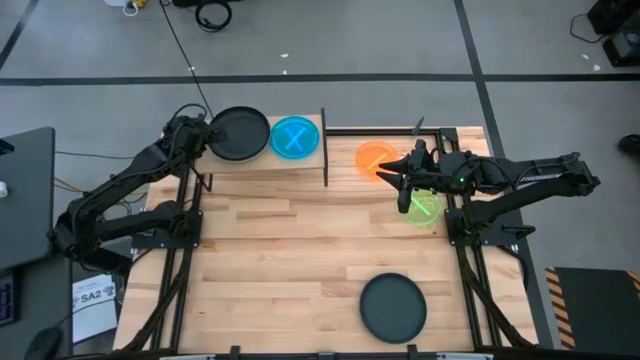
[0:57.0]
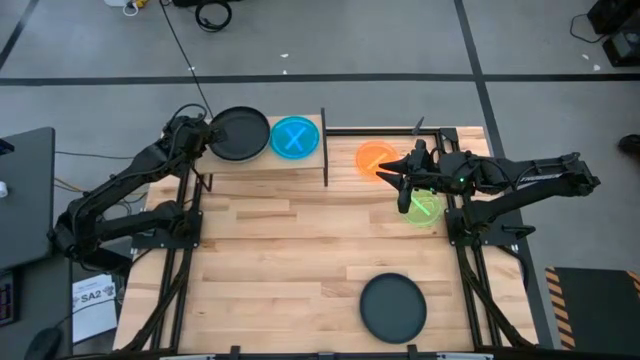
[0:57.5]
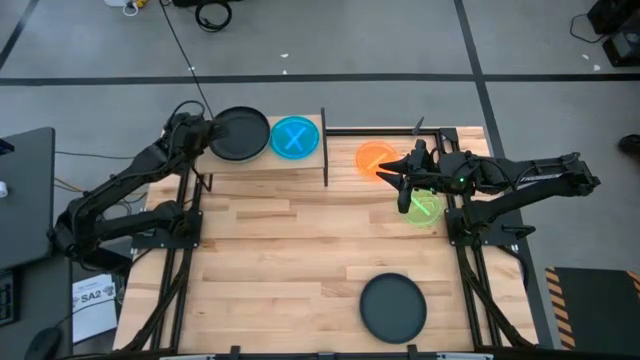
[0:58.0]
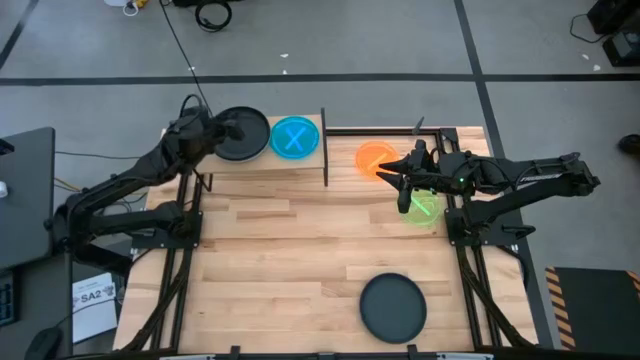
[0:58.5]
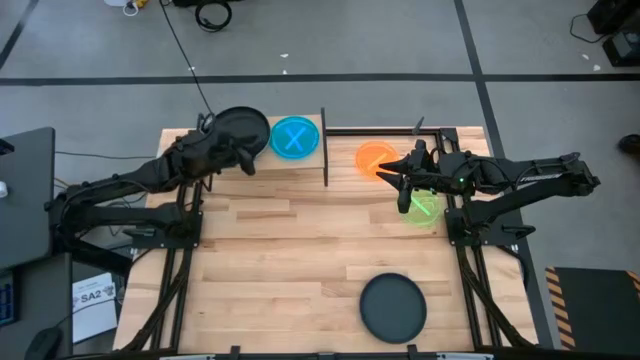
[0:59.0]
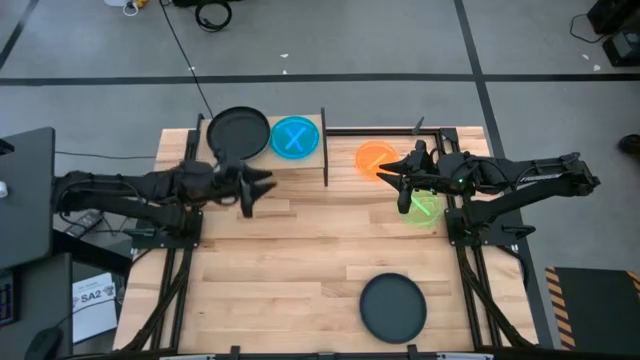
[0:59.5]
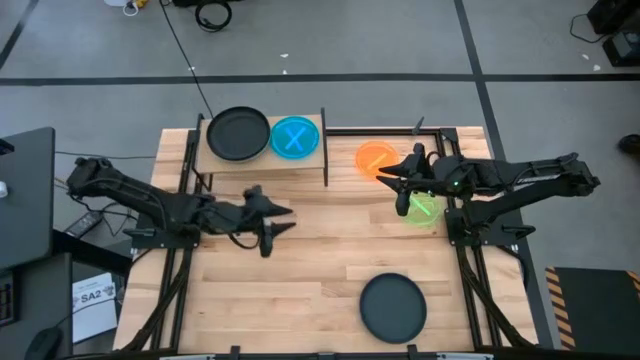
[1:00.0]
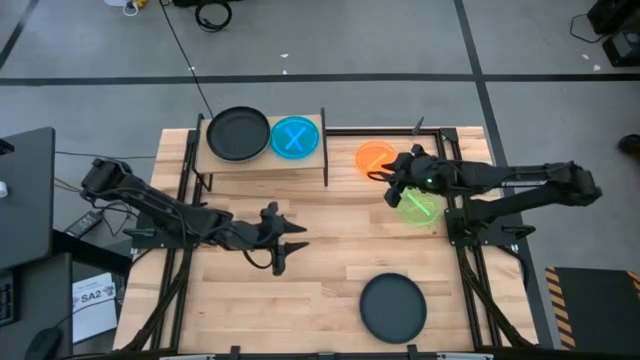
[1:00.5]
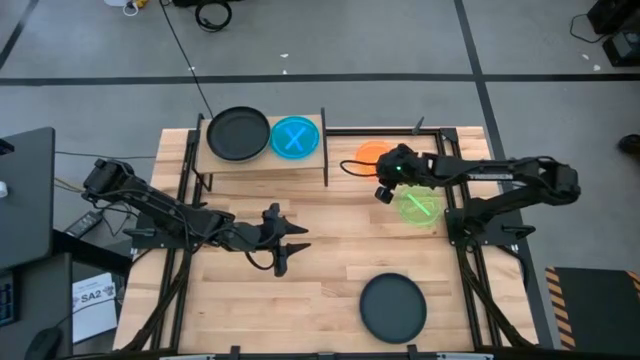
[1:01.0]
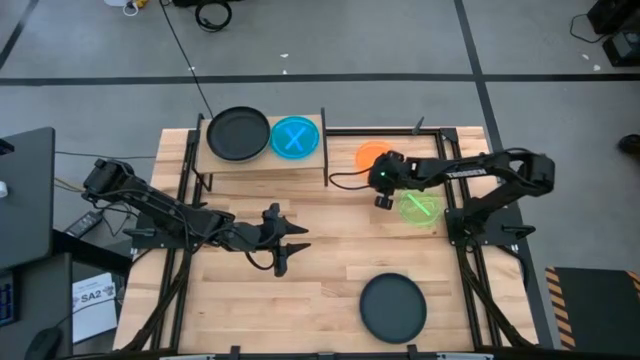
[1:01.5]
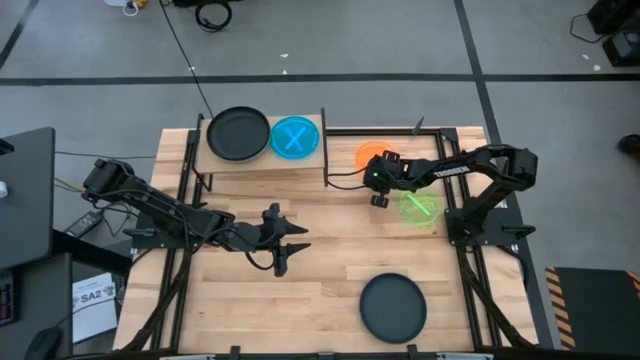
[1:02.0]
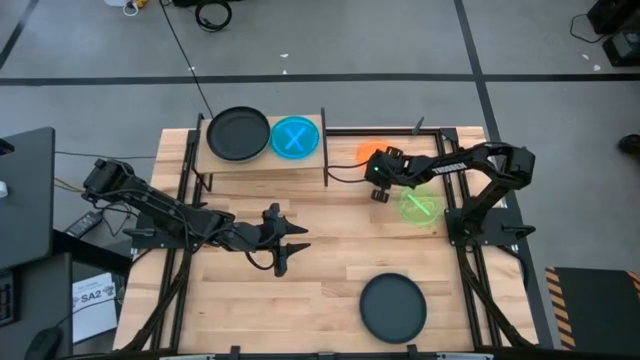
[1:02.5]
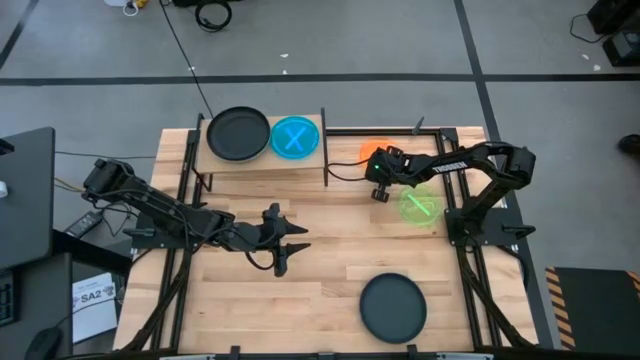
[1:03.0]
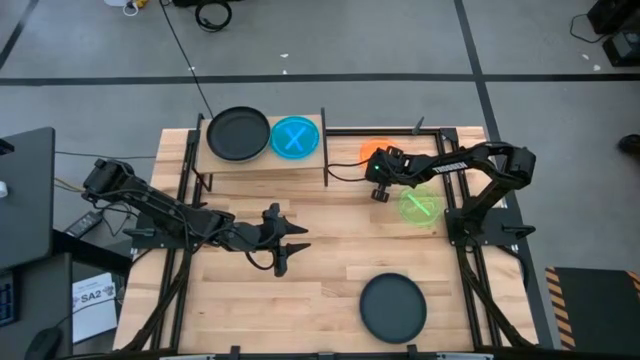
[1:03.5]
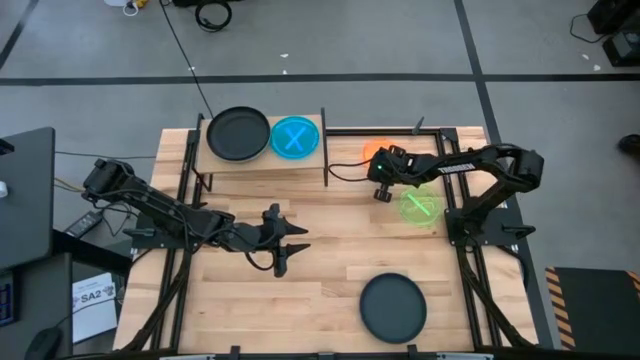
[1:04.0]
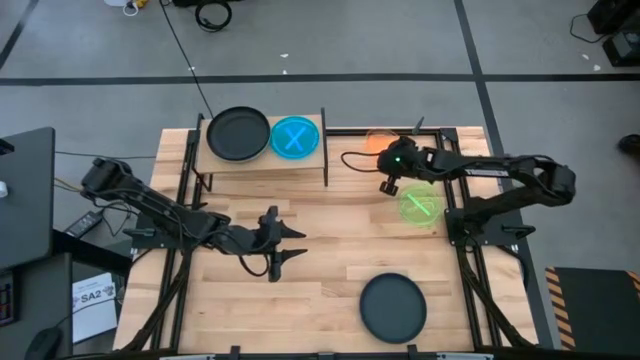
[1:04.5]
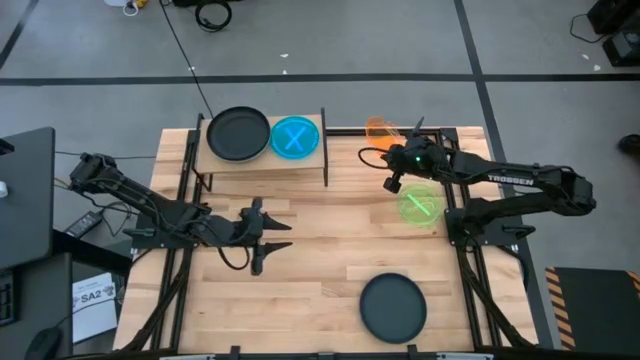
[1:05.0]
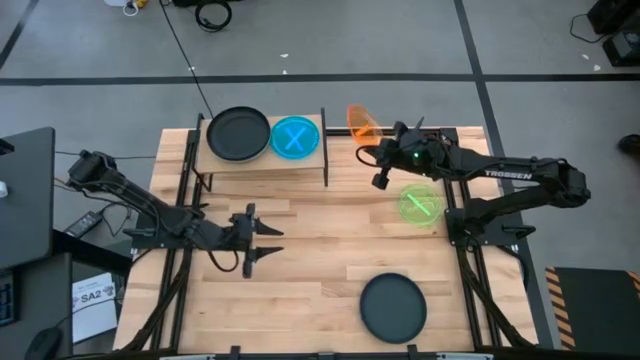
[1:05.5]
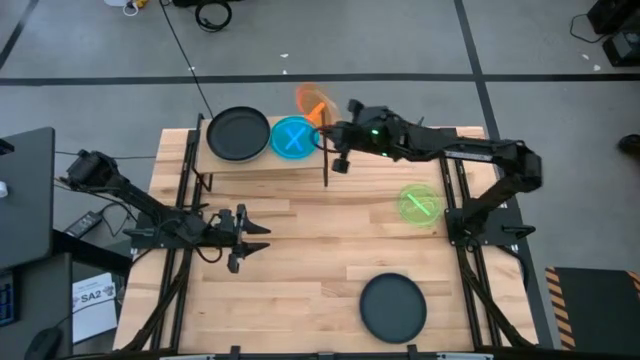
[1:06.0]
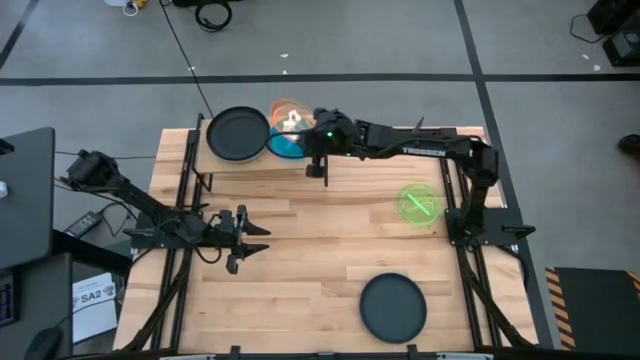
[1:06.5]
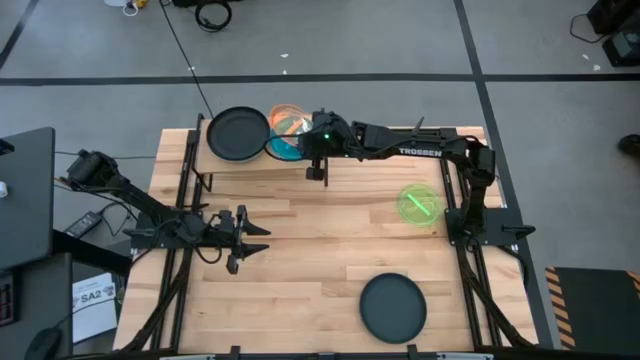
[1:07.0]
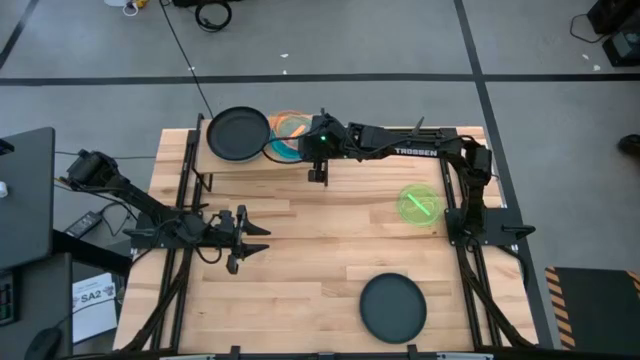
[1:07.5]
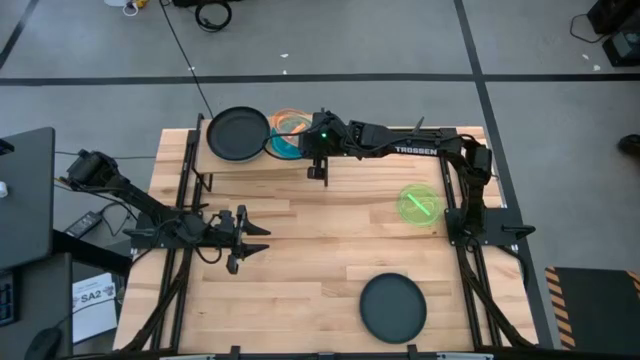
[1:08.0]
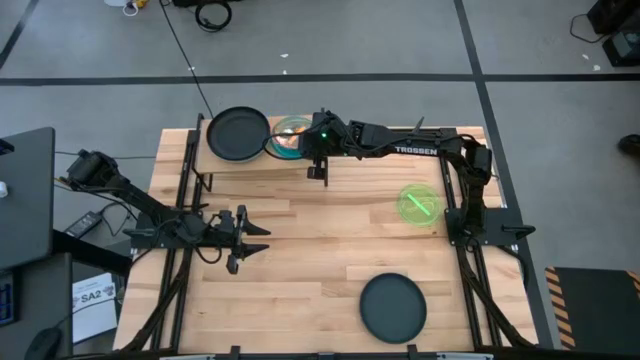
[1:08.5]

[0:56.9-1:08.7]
Task: Place and stack plates onto a shelf
Stack the orange plate on top of the blue plate on the shelf

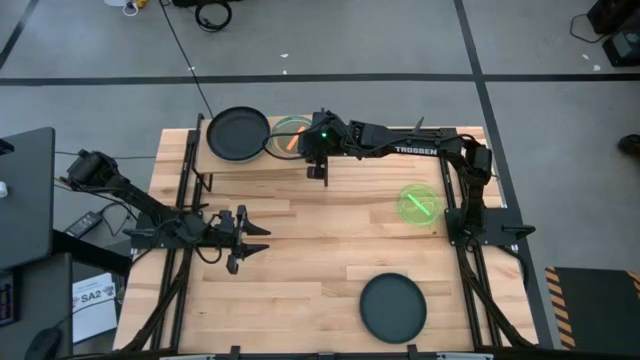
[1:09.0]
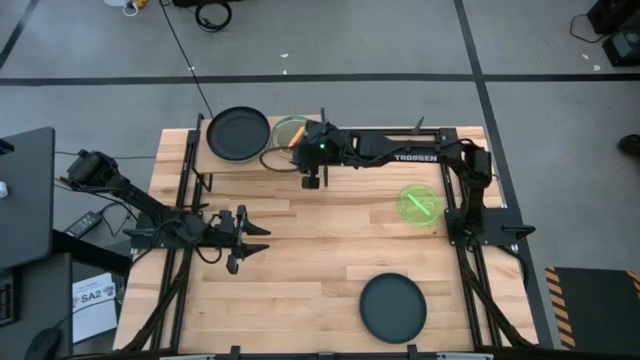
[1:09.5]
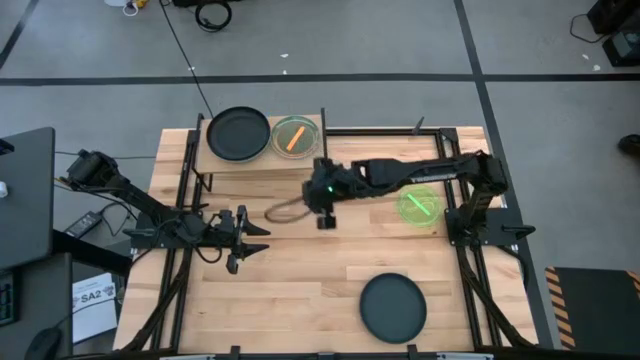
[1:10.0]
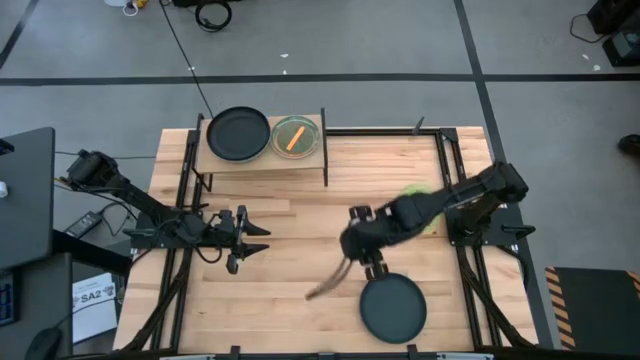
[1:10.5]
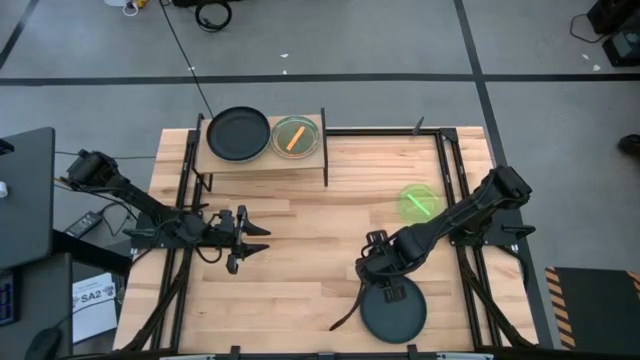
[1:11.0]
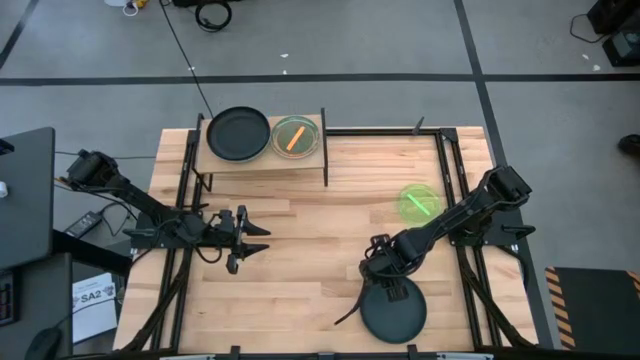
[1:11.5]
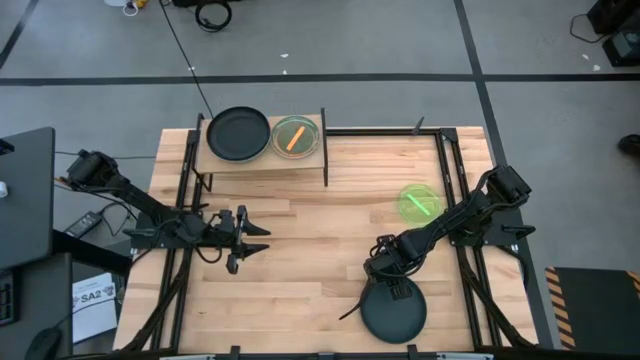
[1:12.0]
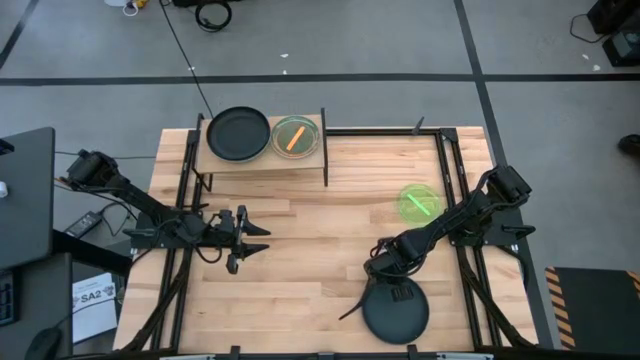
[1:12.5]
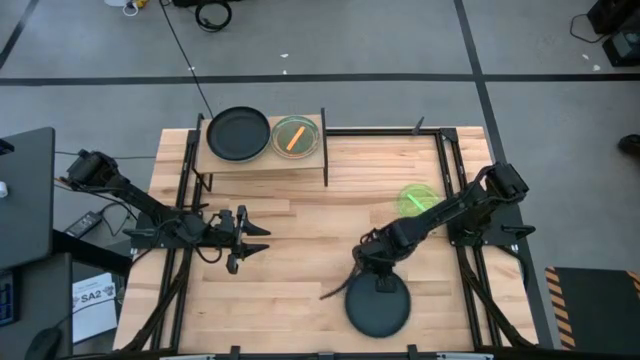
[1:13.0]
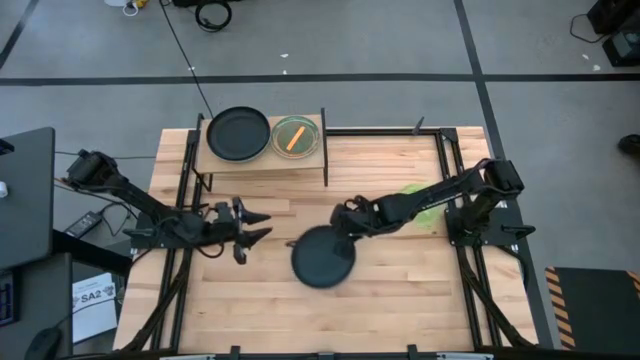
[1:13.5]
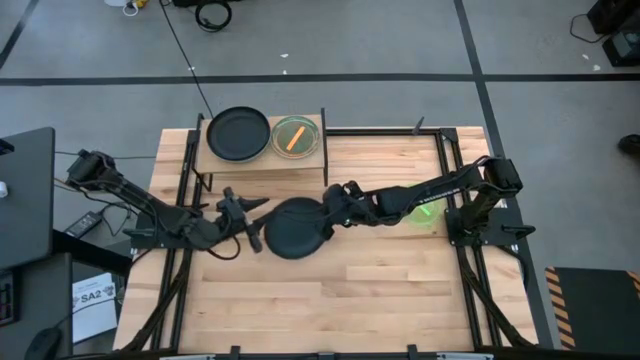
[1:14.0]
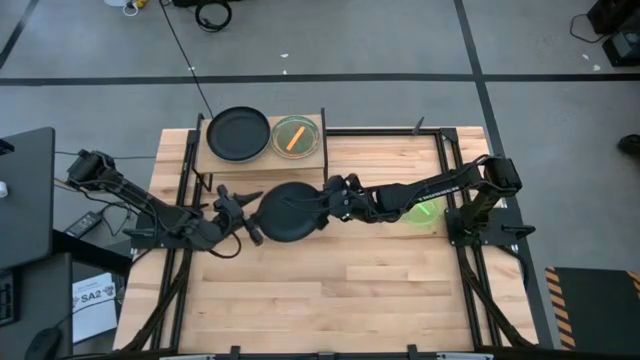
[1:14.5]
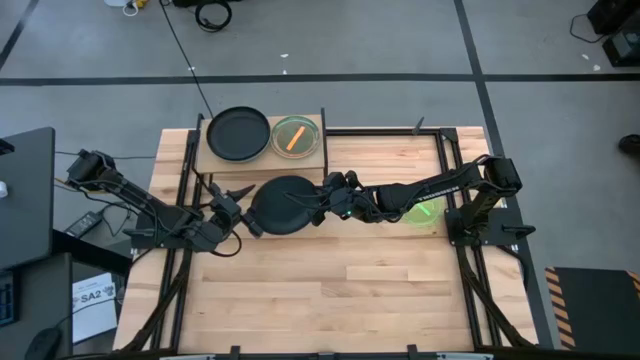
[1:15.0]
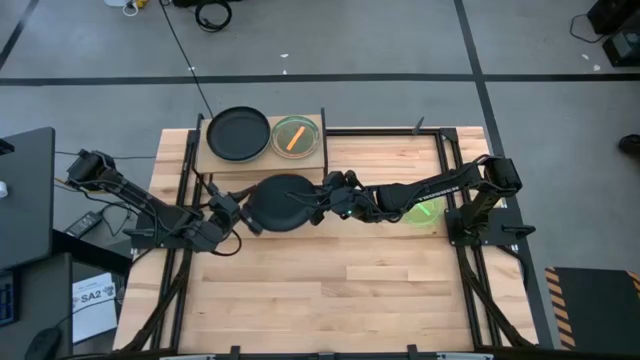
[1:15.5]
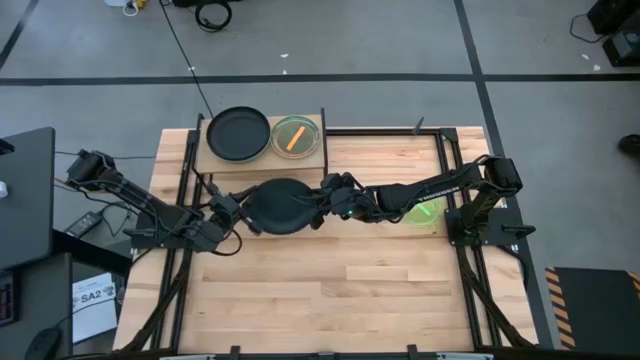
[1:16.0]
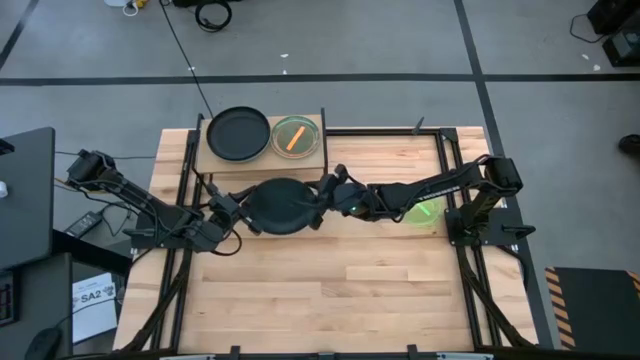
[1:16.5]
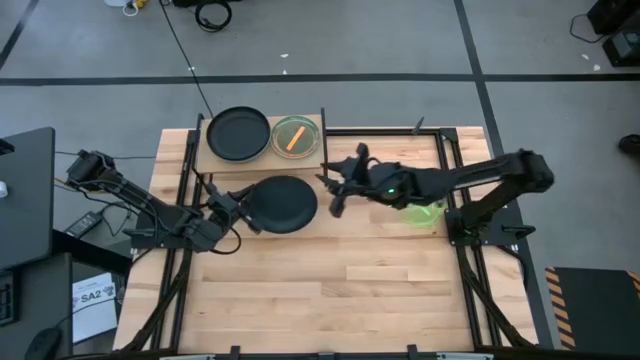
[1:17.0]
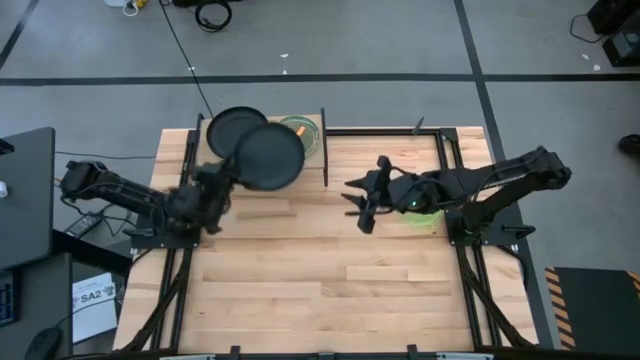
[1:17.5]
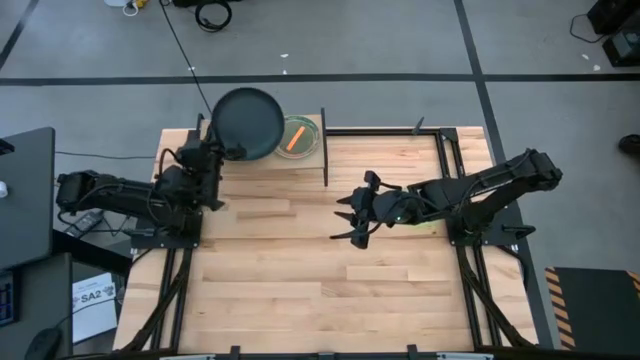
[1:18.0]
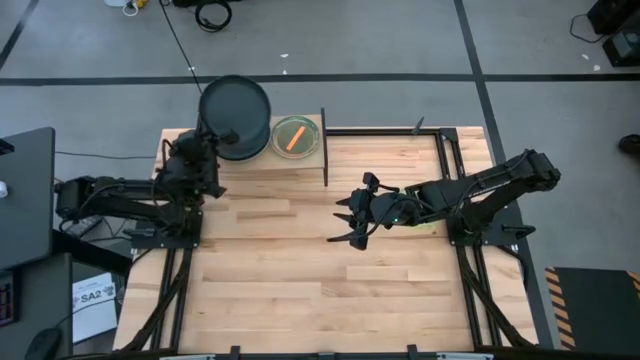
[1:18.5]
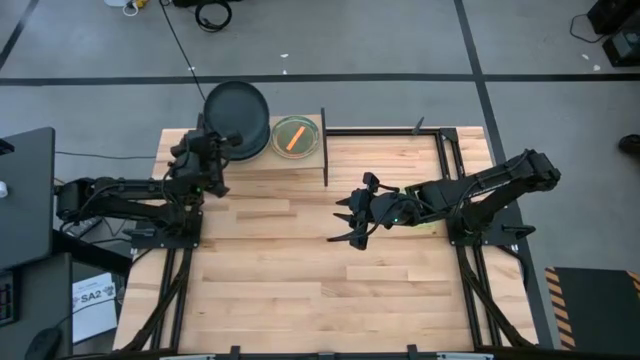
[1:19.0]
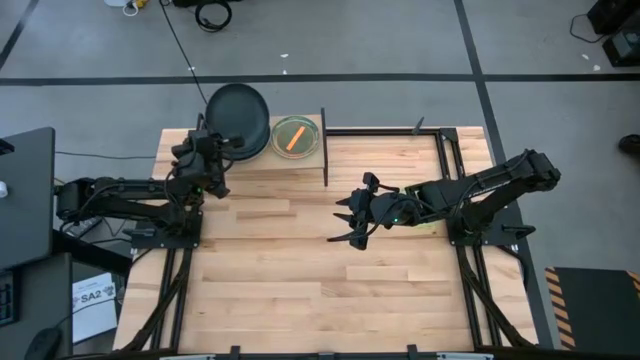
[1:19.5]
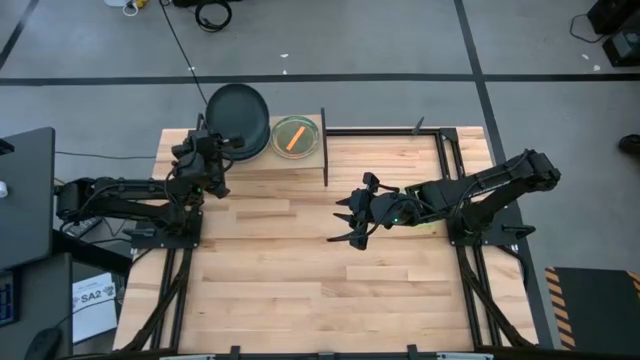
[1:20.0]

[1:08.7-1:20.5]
Stack the black plate on top of the black plate on the shelf
